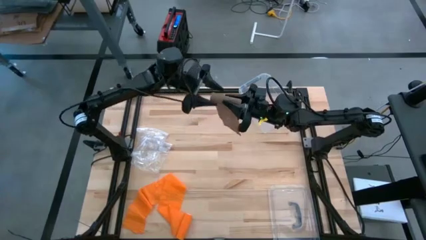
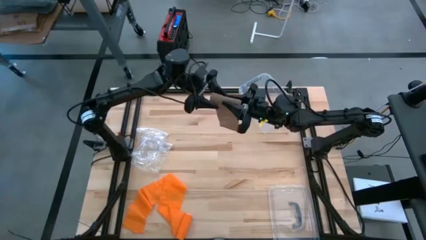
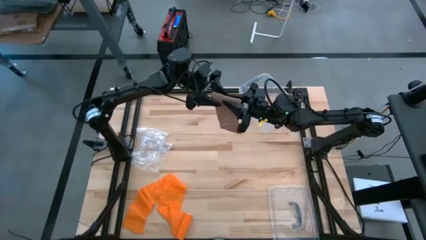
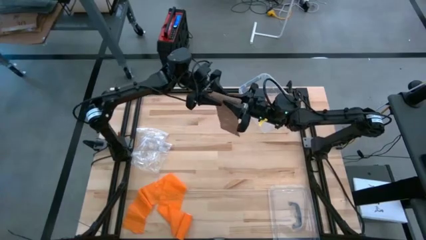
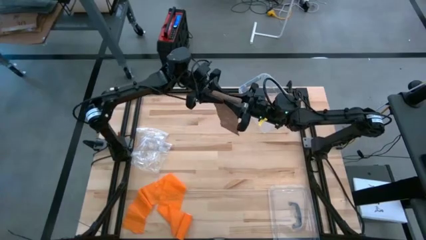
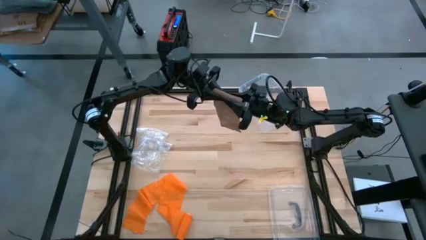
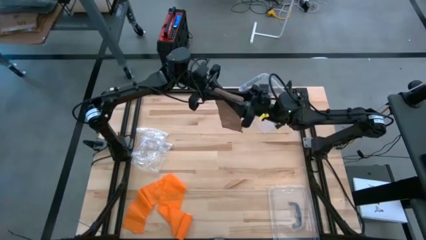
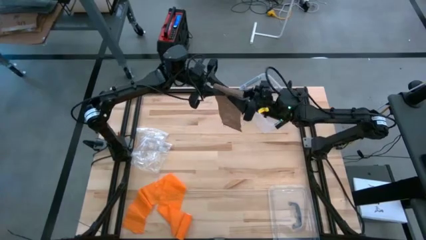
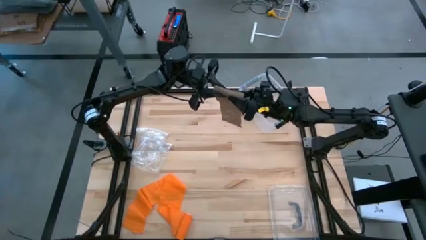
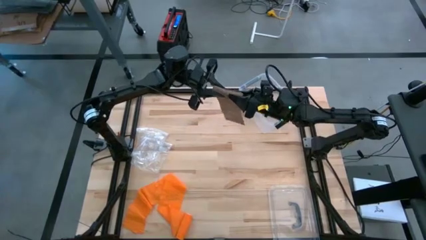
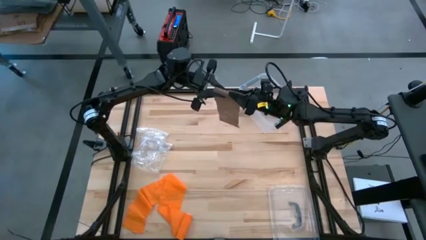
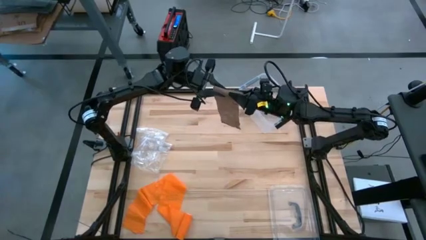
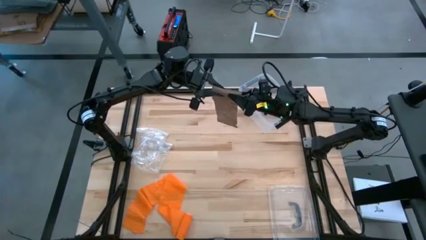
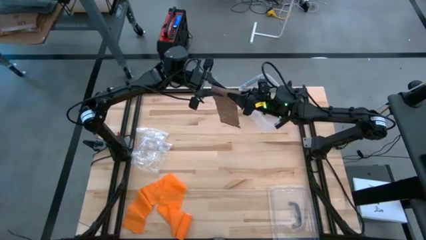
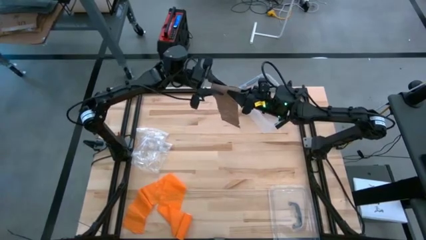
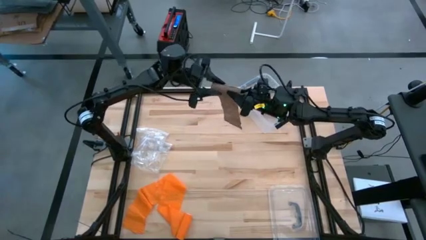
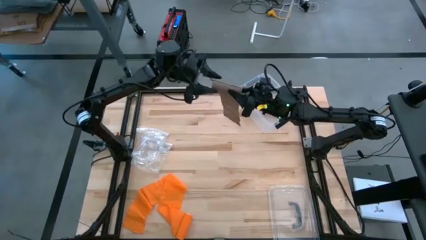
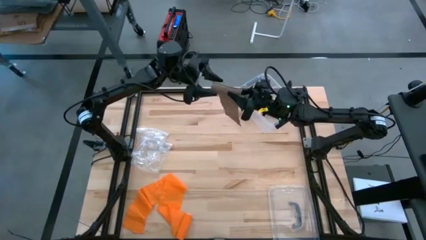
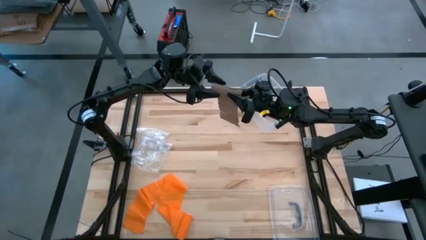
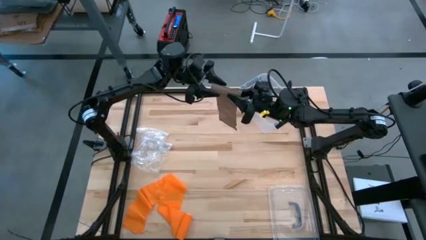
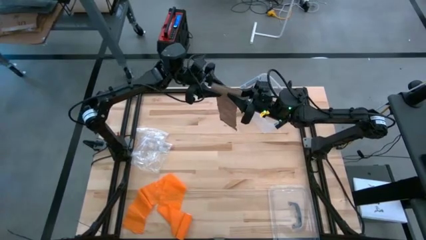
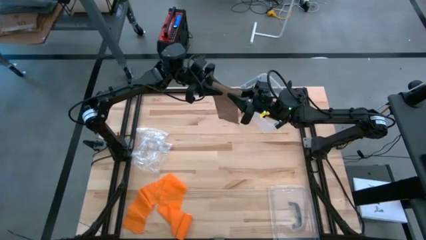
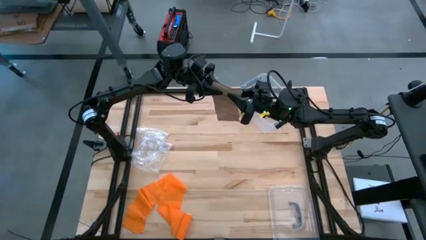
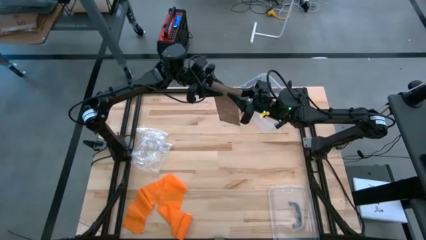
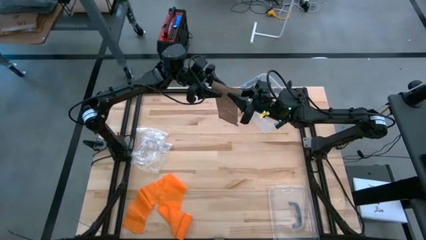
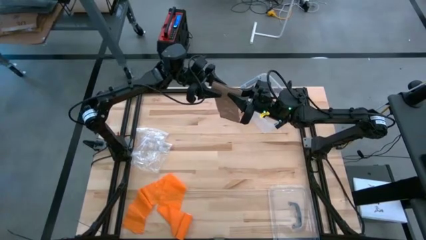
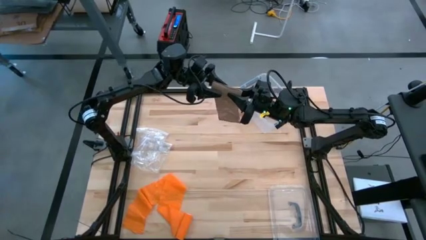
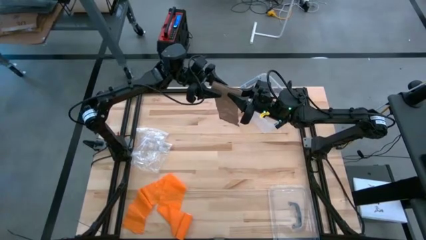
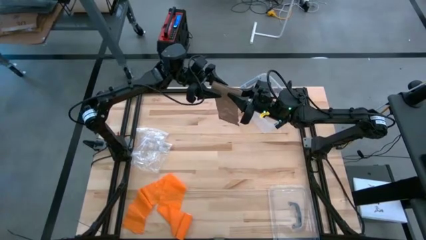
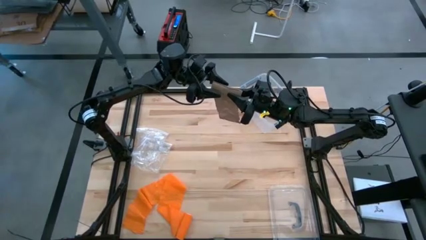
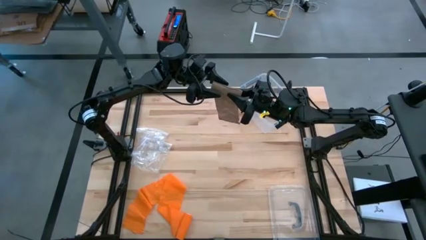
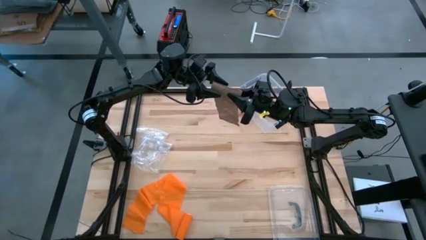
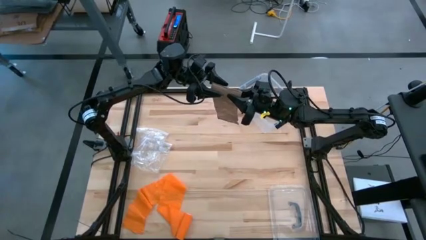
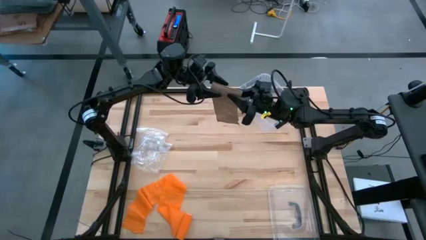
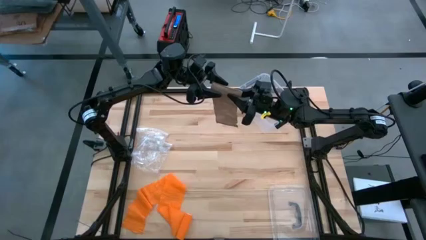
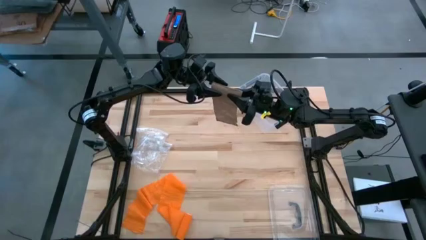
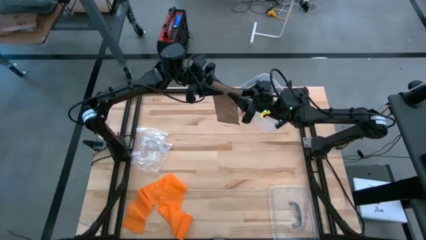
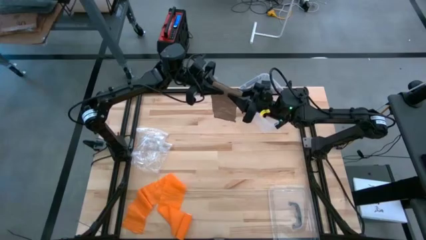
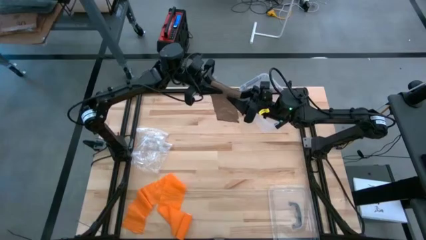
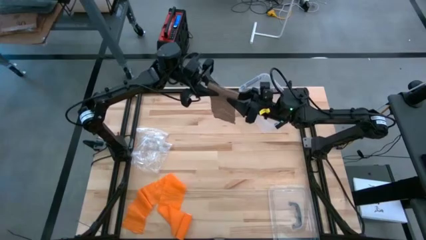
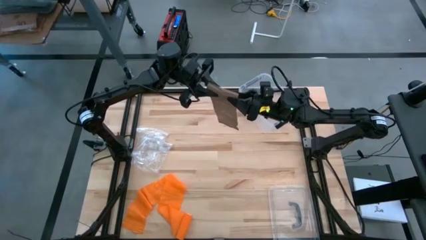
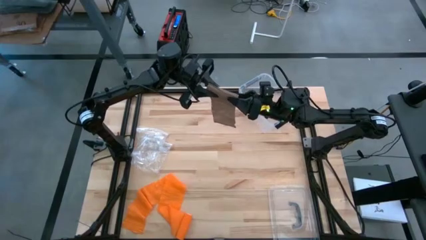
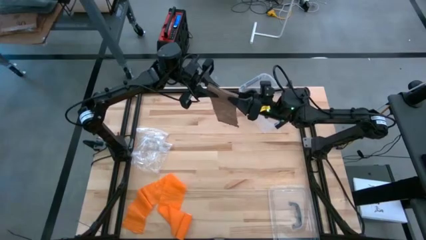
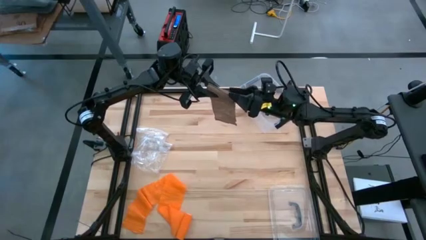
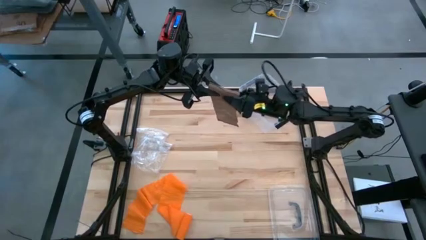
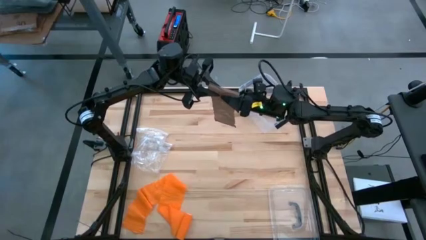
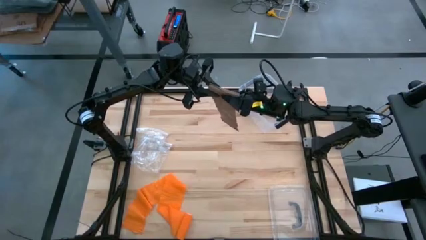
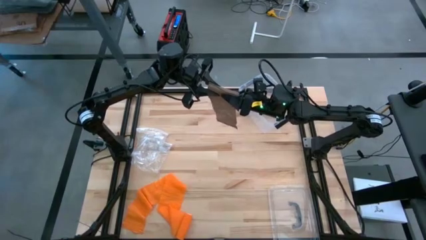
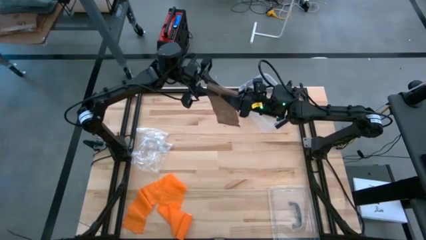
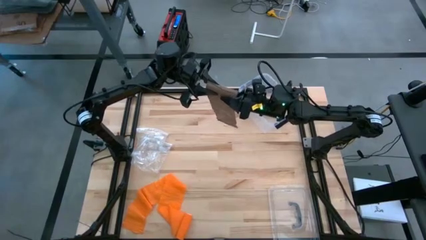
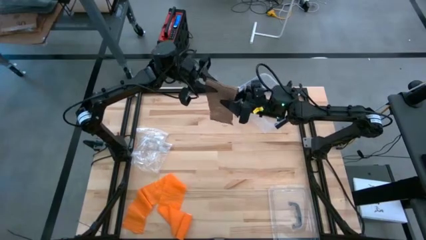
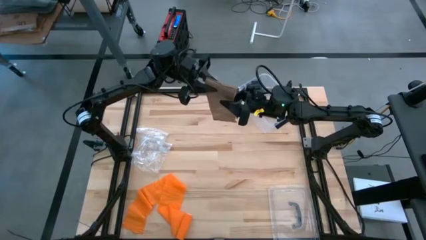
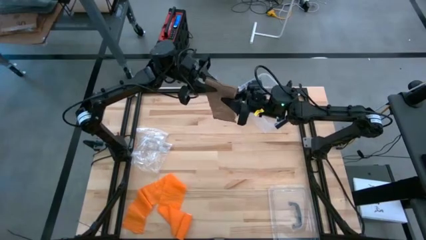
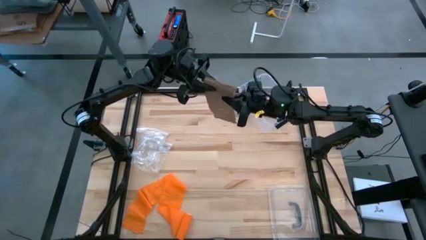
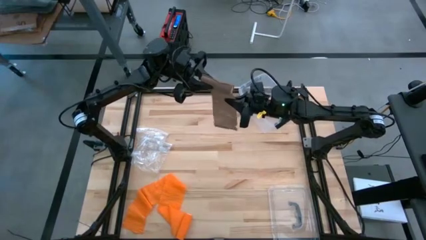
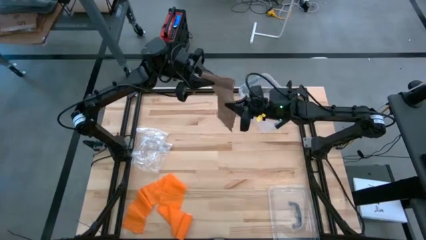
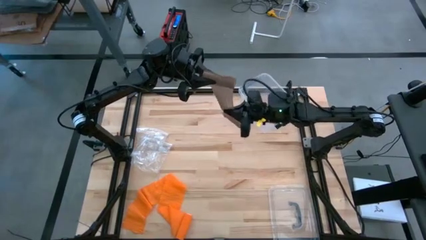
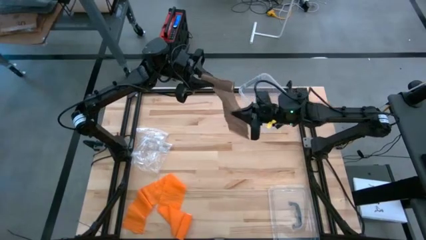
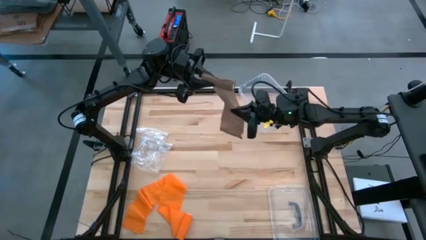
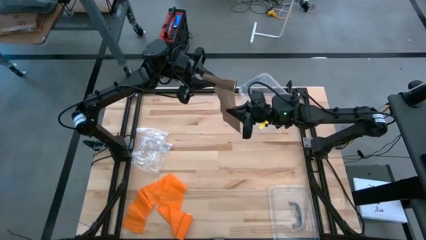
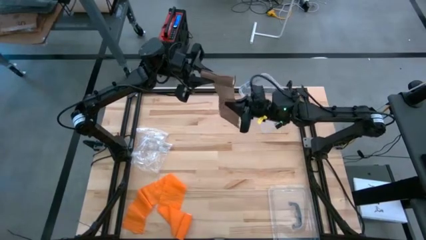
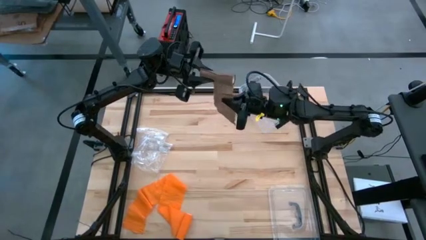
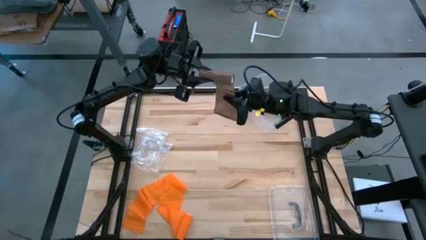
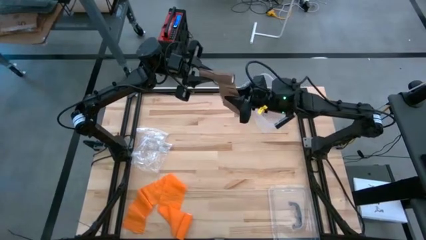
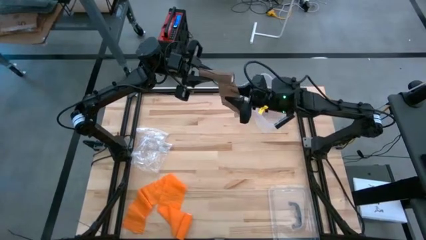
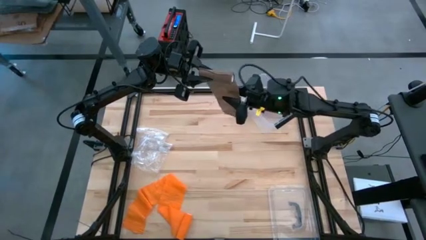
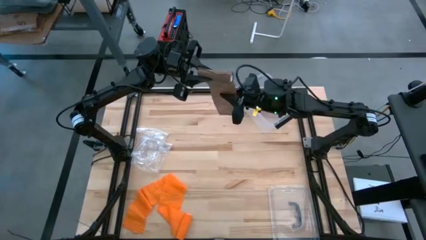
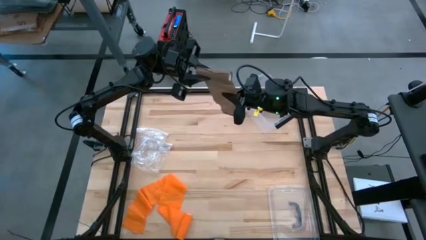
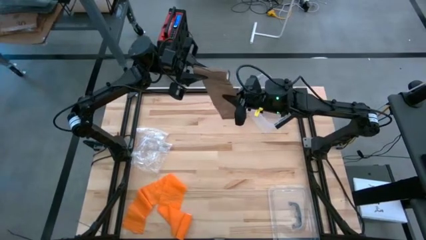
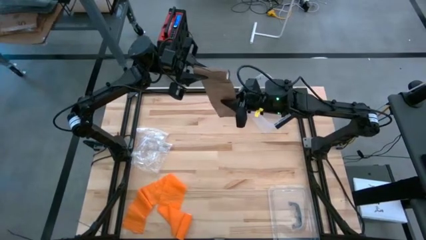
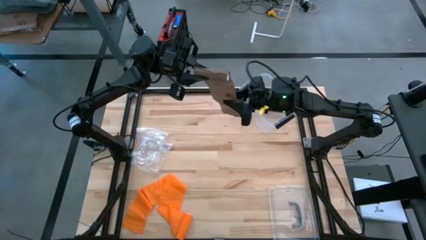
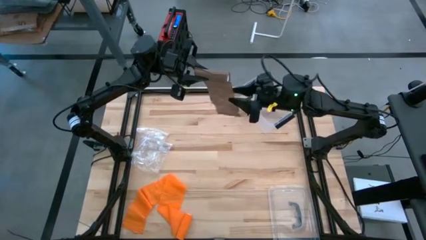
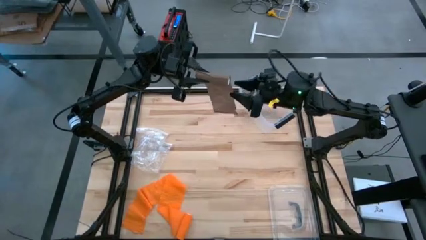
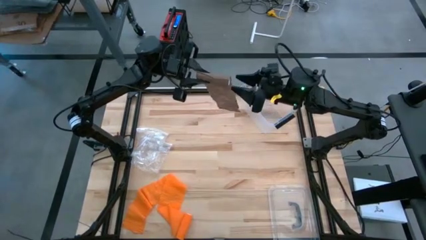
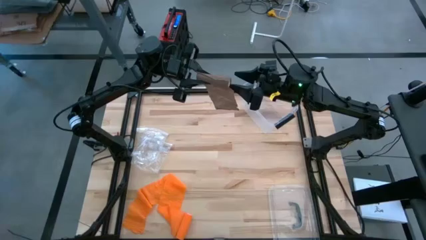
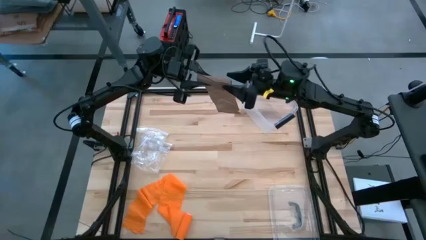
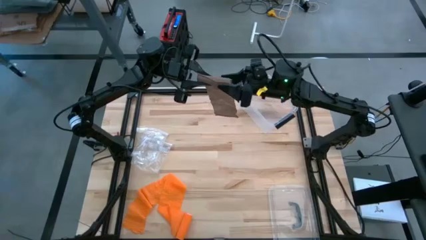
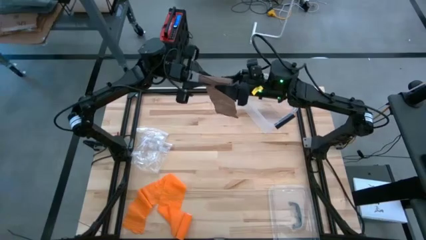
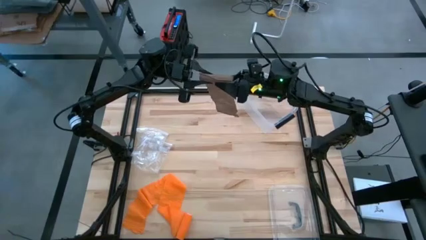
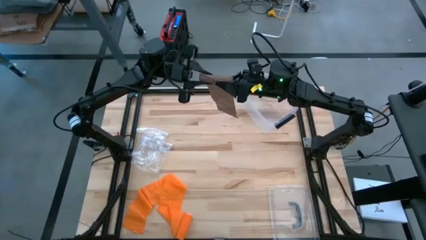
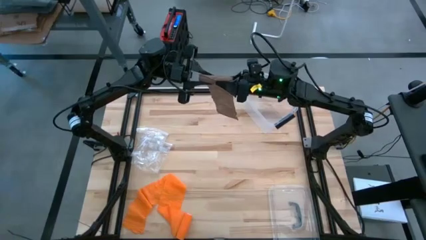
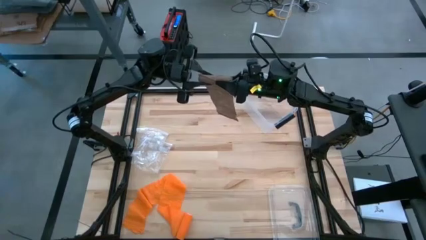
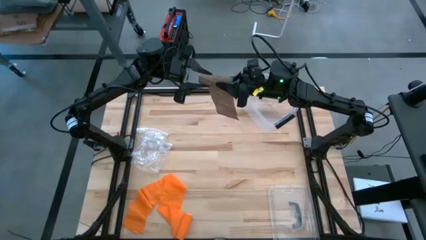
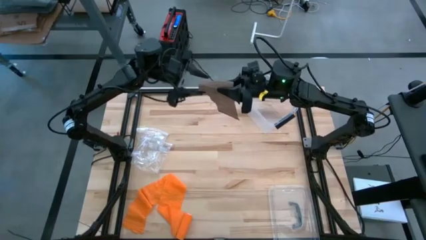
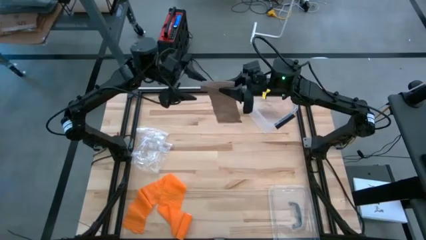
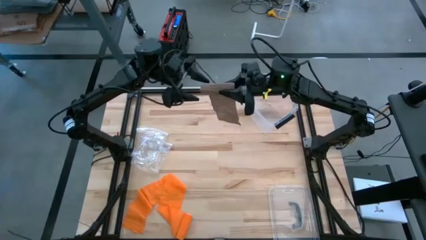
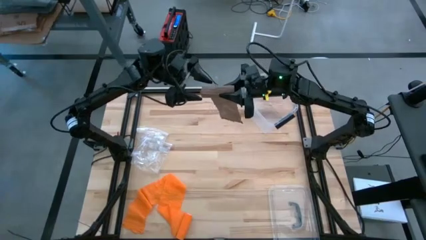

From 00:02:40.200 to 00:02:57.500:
Task: Roll bandage
Roll the brown bandage
